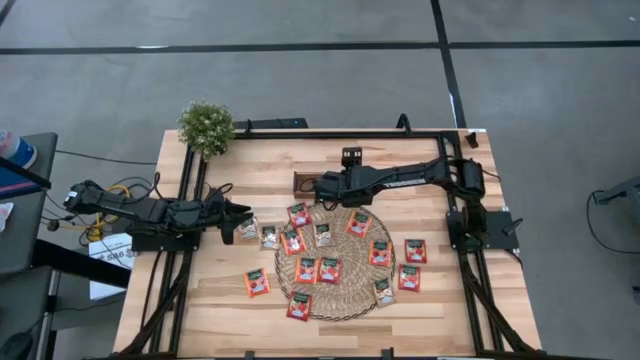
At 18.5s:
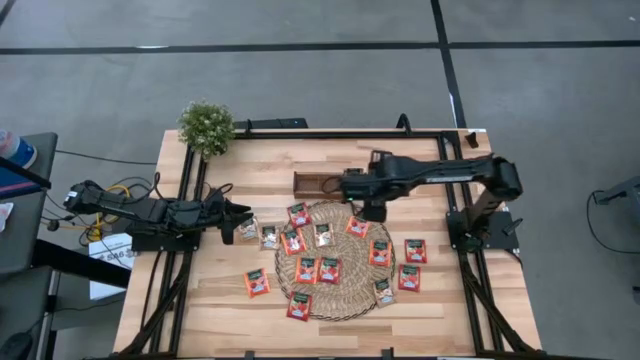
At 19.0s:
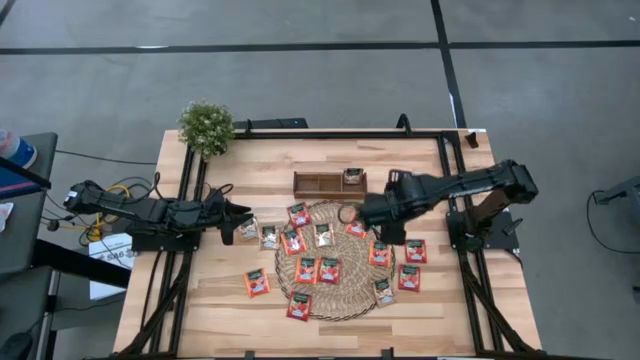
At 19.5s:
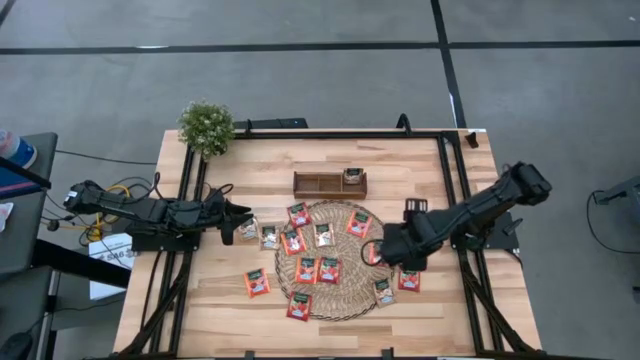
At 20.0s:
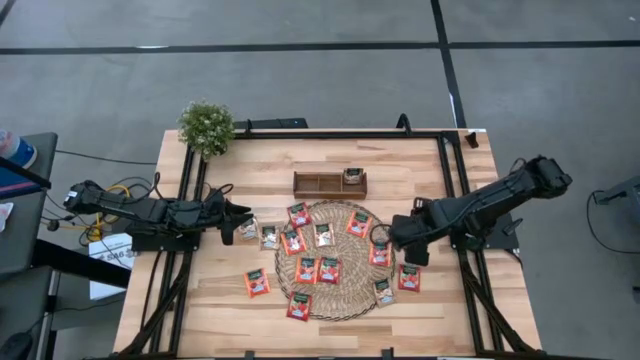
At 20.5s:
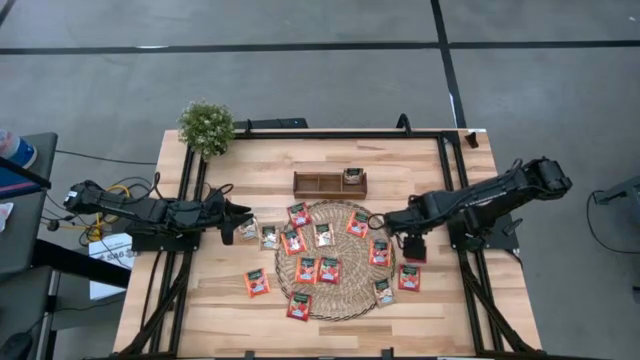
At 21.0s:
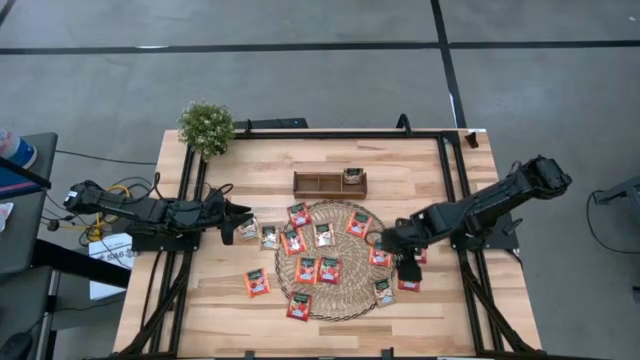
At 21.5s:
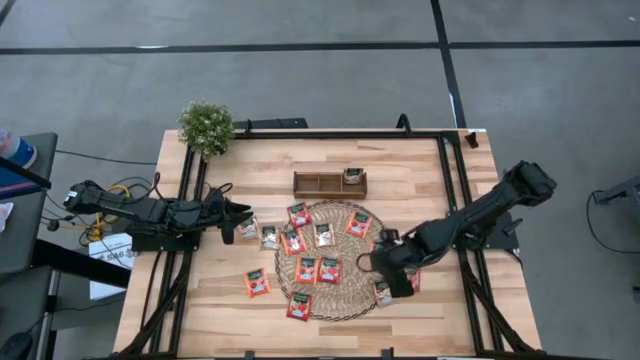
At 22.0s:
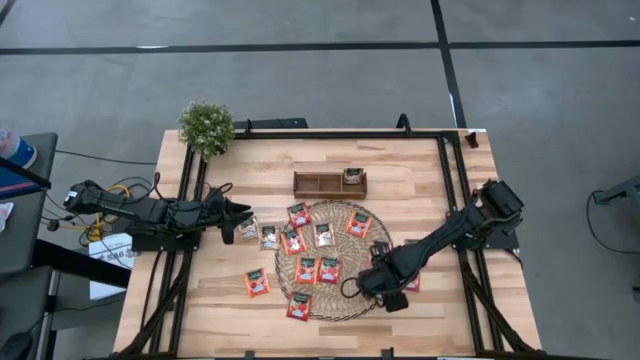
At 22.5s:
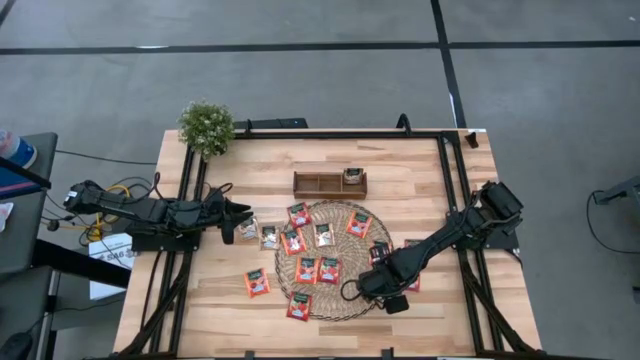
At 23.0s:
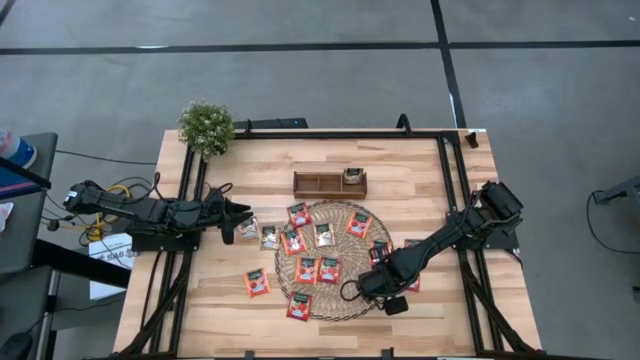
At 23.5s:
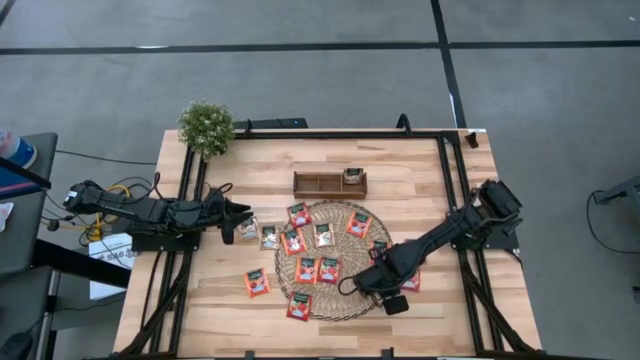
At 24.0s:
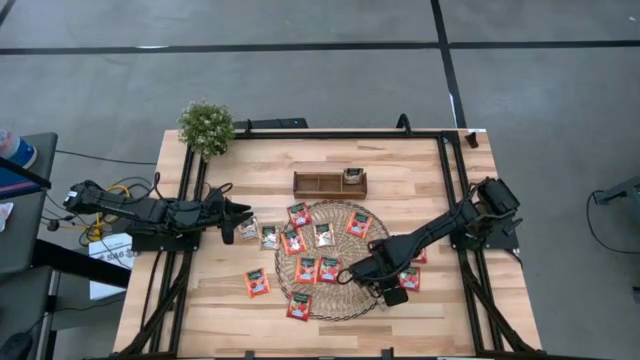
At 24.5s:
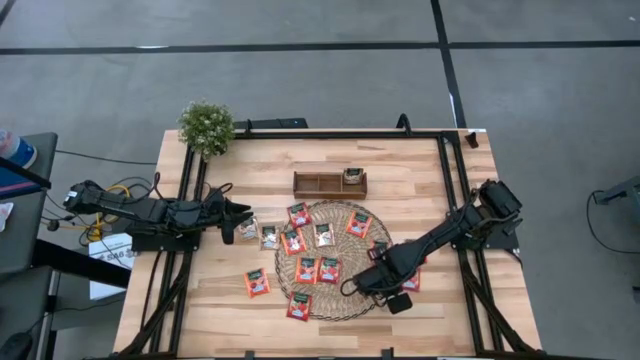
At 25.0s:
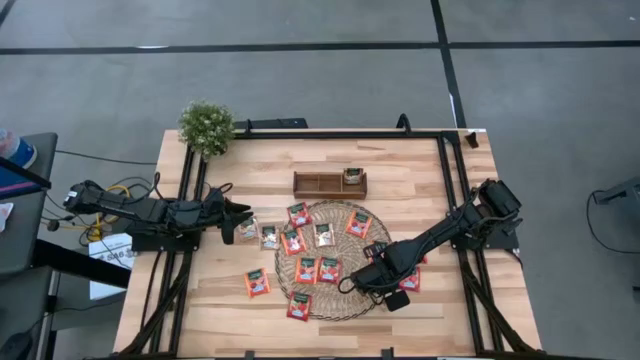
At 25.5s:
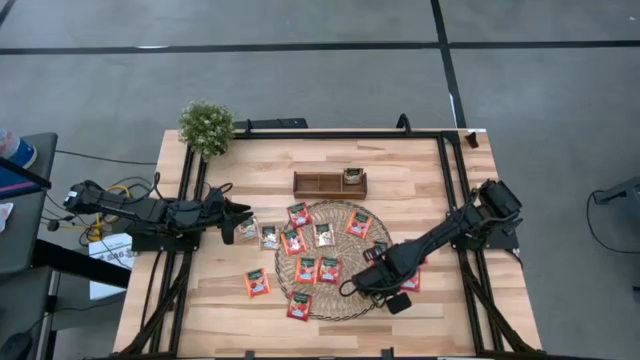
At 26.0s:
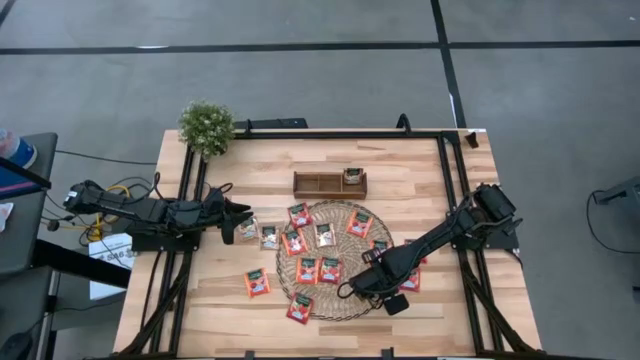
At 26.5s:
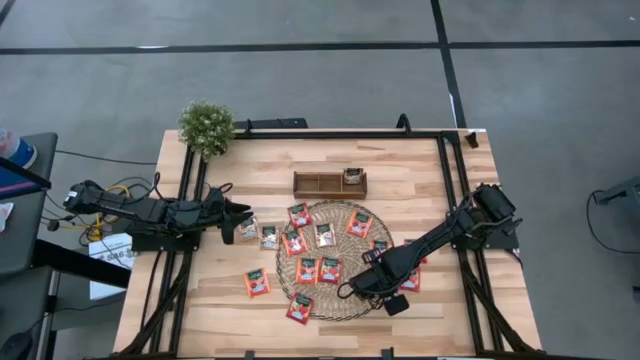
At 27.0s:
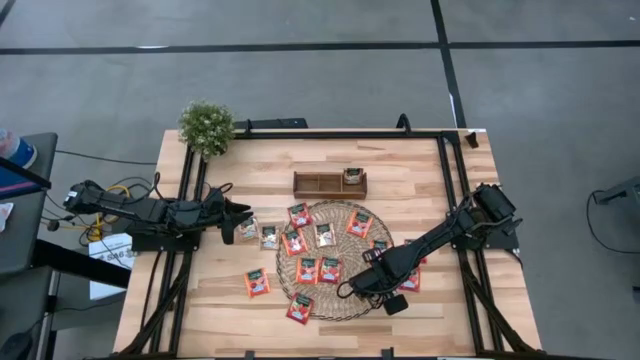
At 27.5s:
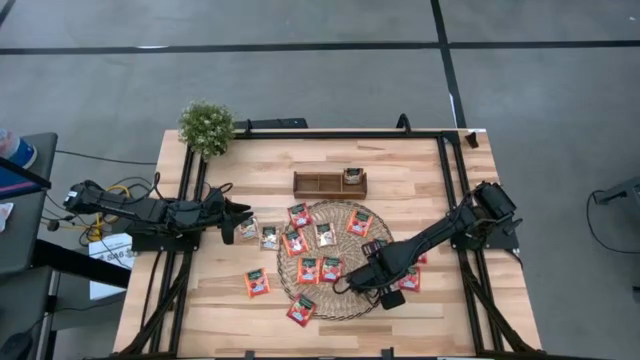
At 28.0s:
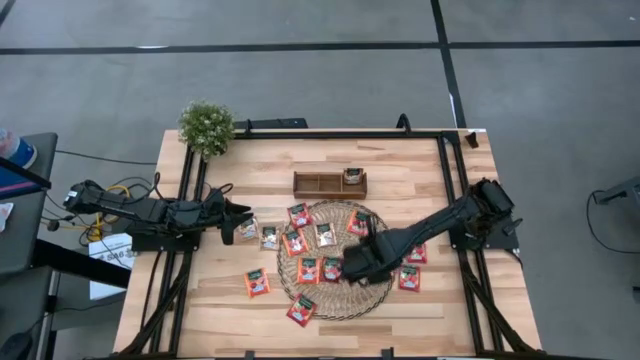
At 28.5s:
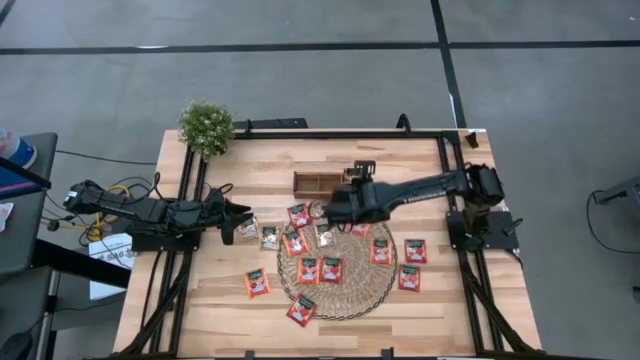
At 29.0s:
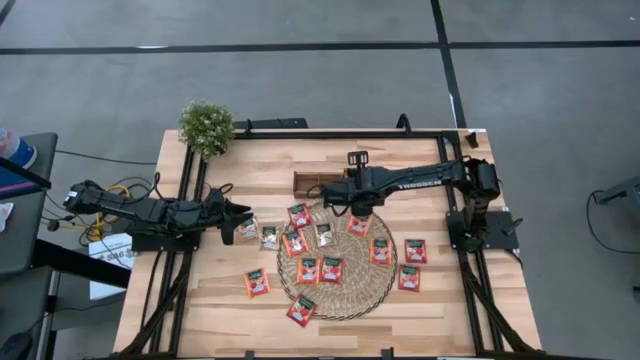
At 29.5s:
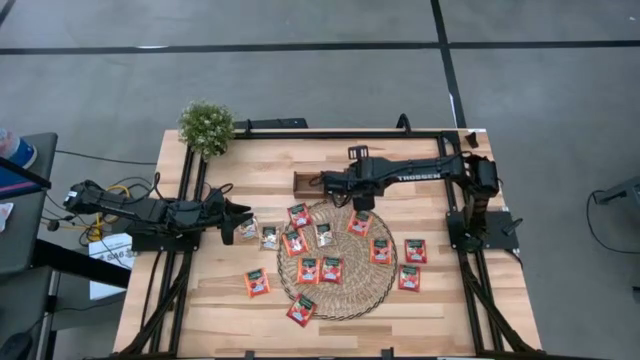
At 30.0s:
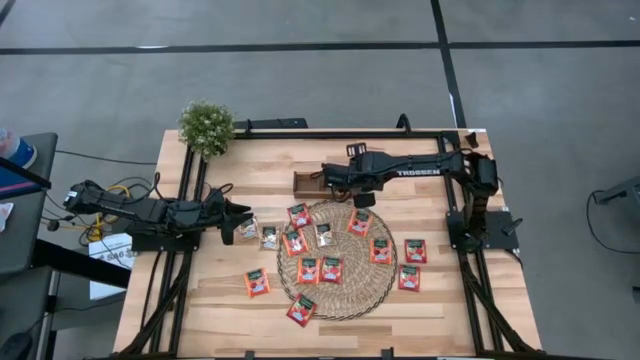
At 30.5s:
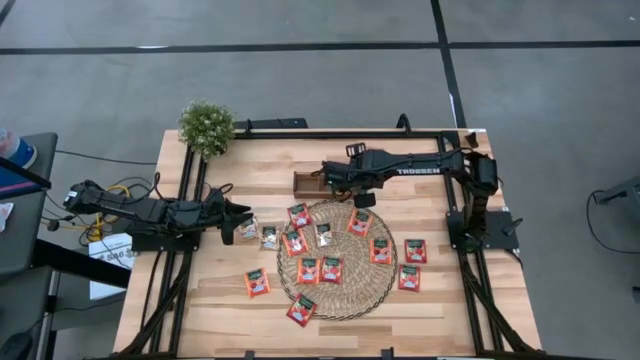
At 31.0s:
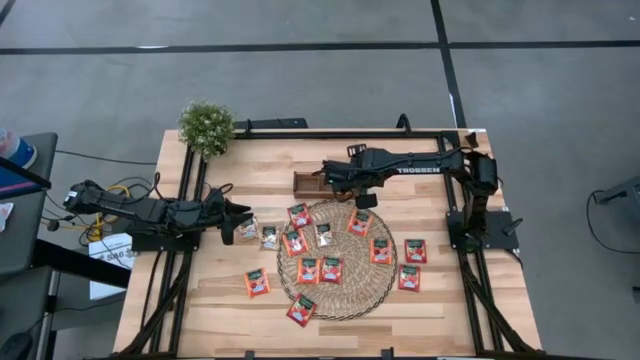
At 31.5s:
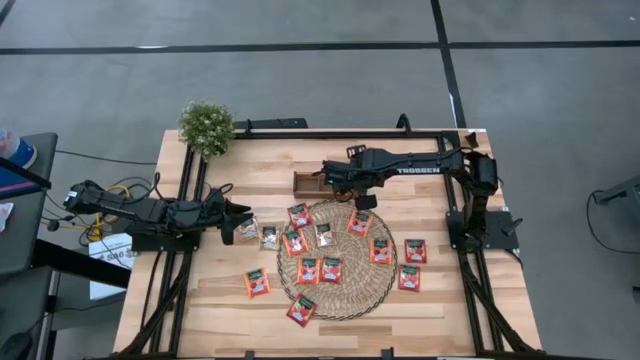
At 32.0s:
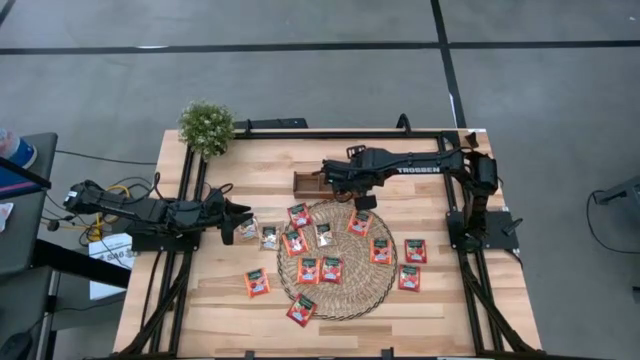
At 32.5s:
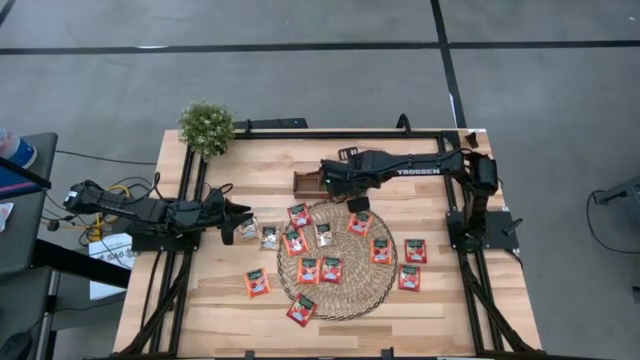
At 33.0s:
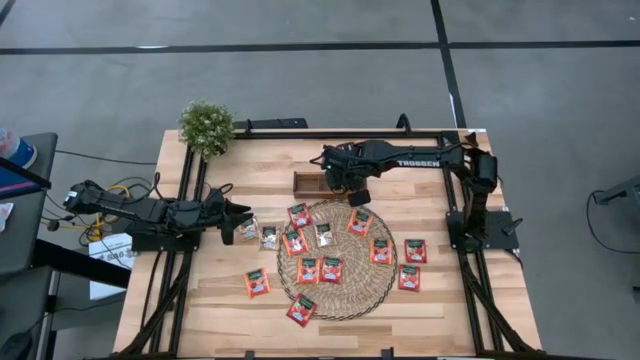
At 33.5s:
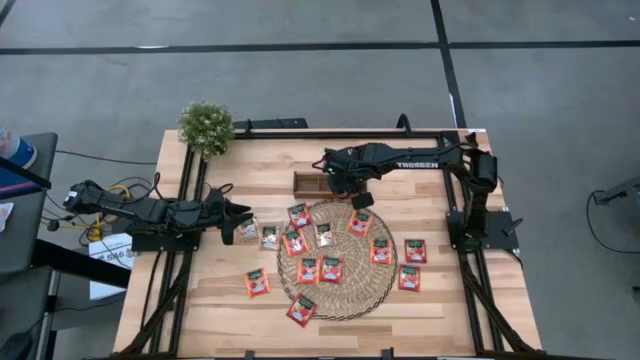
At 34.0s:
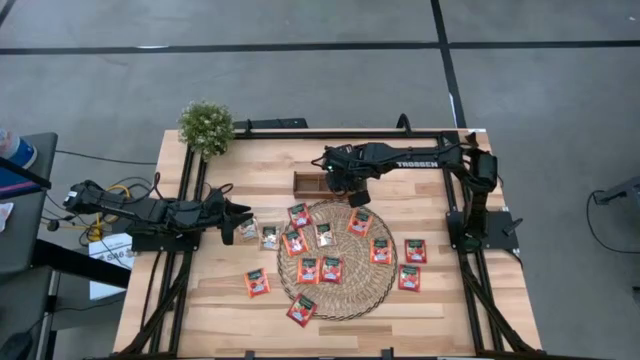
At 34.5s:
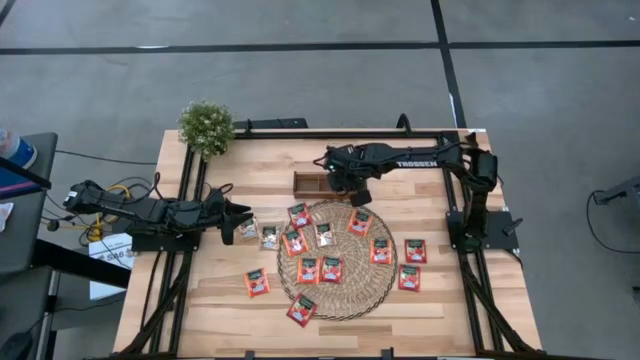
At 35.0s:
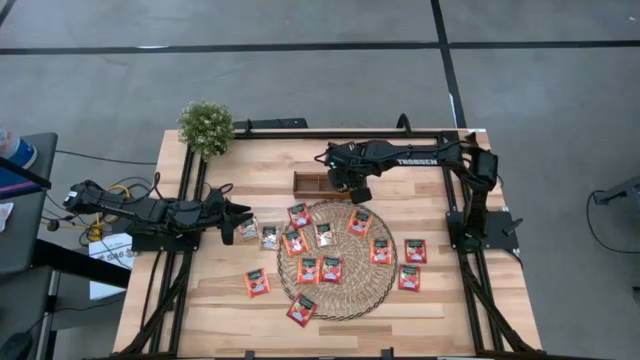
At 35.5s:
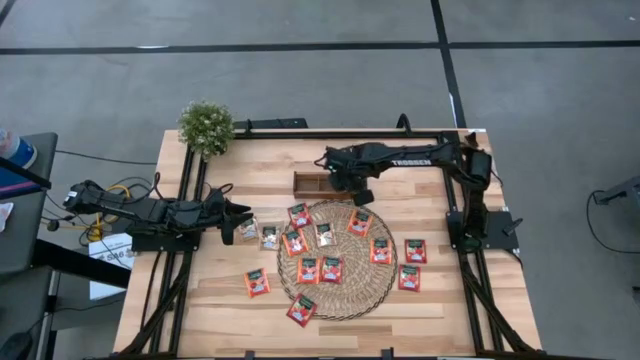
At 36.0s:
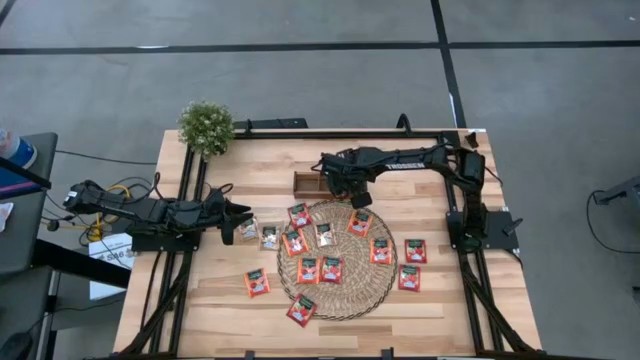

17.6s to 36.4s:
Task: Pick & Place Tea
Put the brown tea bag into the right section of the wooden organizer

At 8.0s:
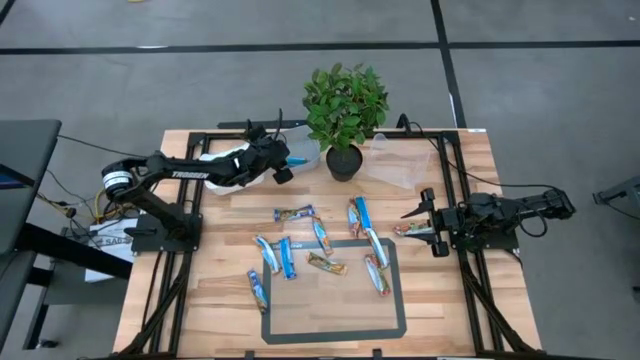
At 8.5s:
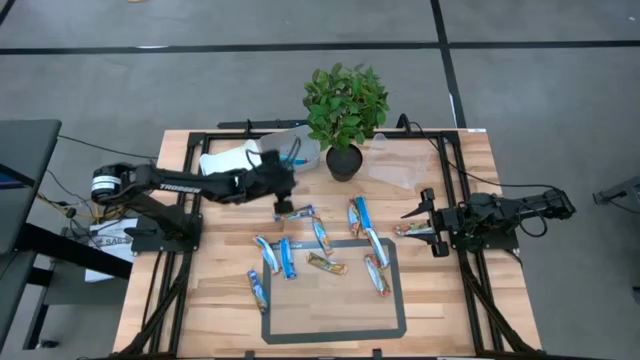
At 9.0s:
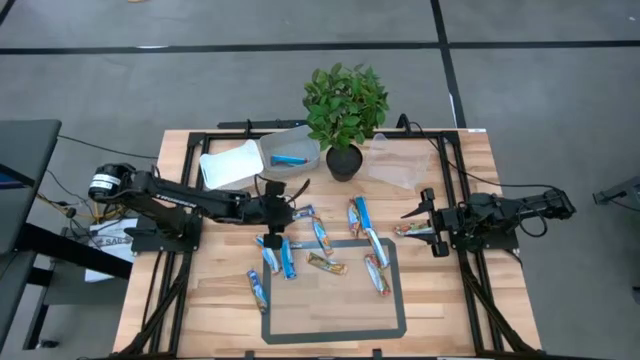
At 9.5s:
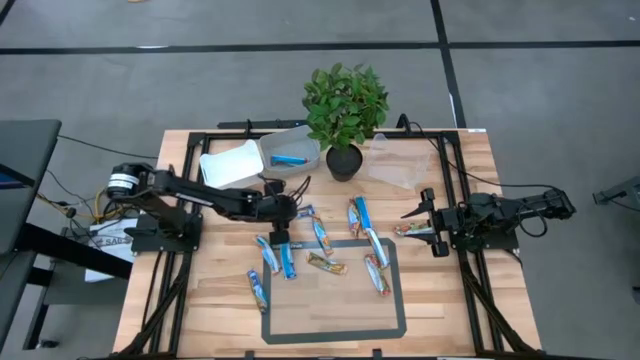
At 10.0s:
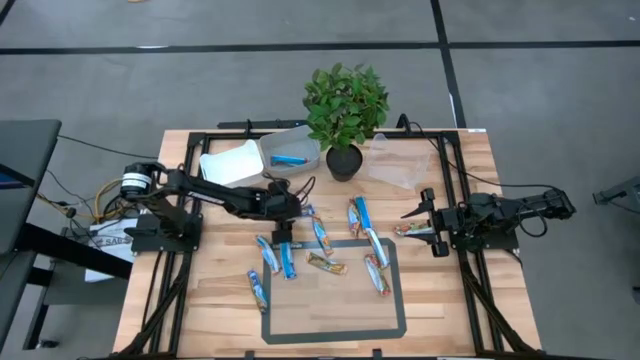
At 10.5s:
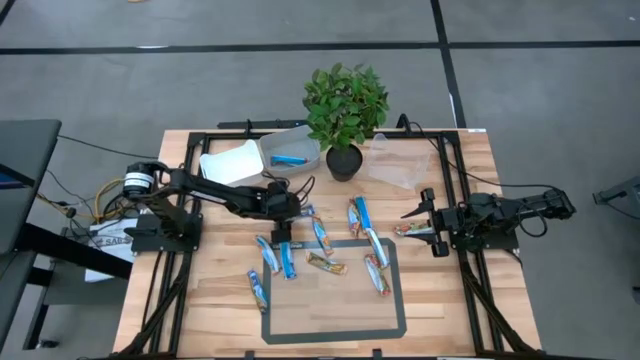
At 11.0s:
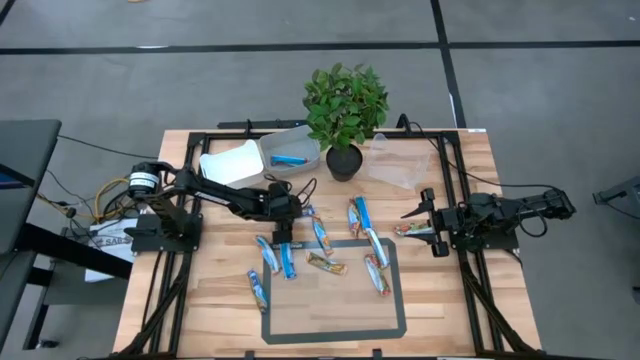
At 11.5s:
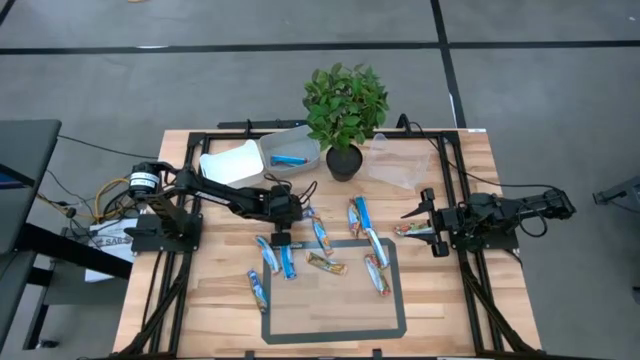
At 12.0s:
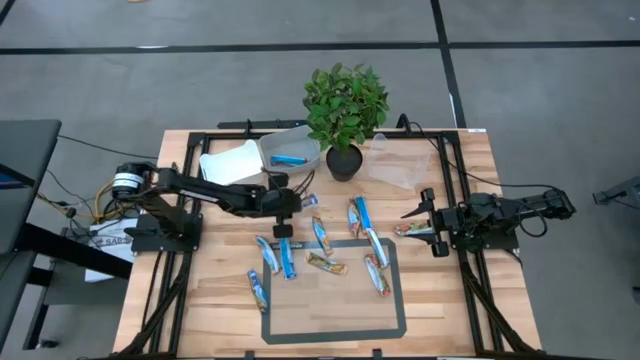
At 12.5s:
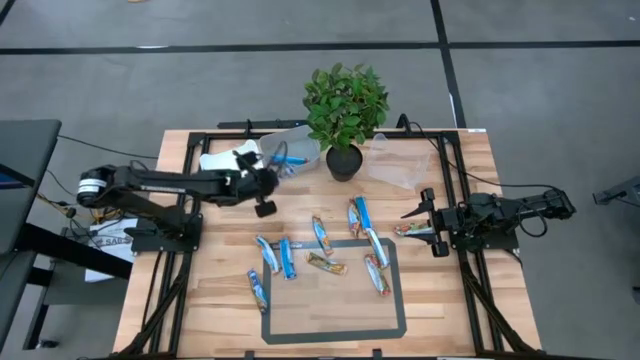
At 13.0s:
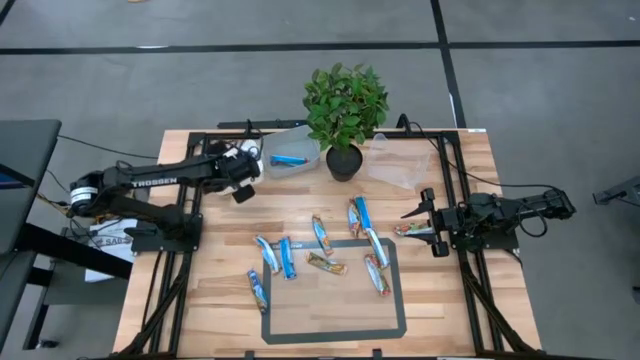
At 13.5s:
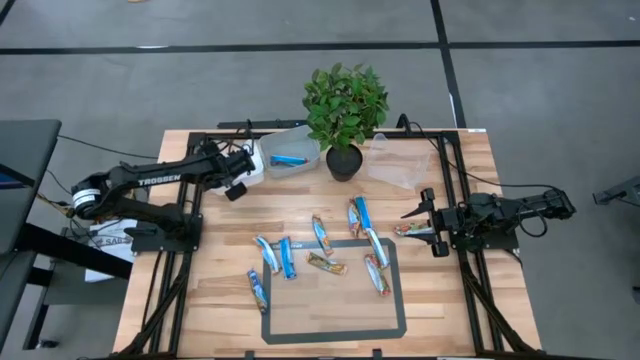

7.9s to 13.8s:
Task: Pick and place Granola Bars by type
Put the blue granola bar into the white bin
